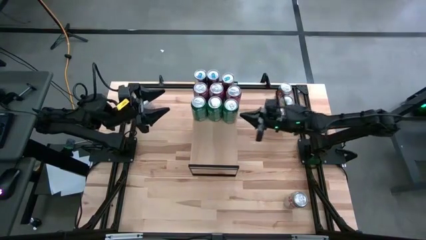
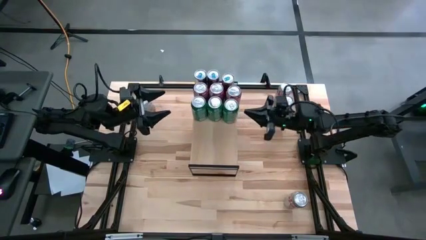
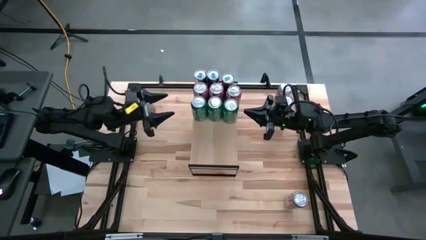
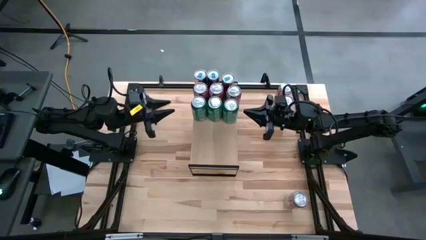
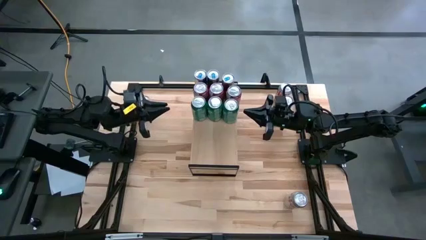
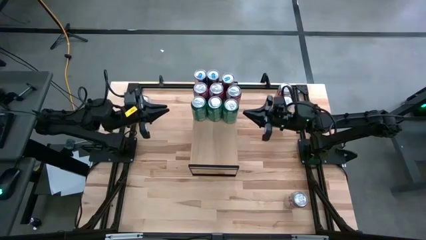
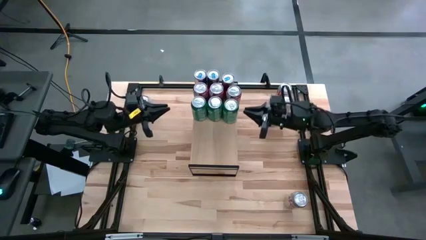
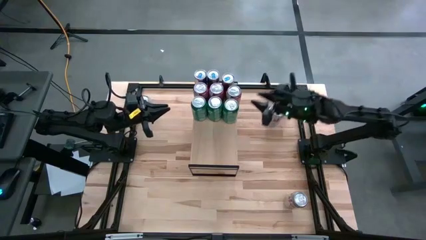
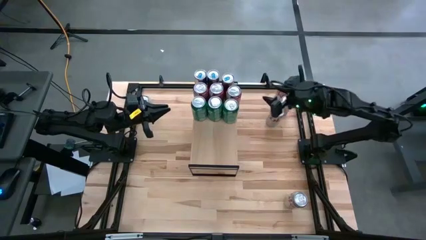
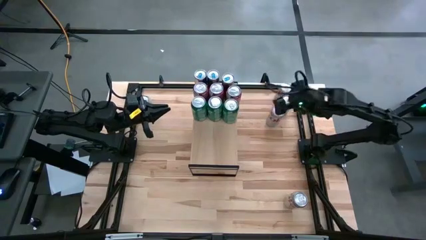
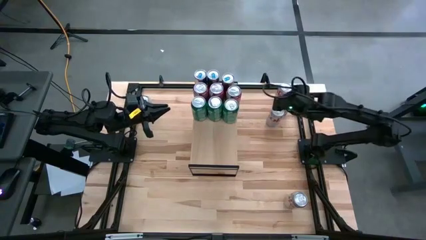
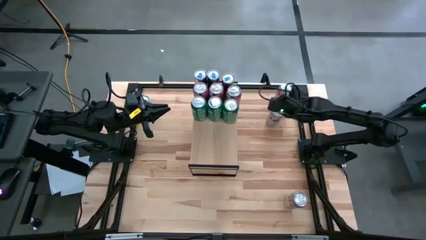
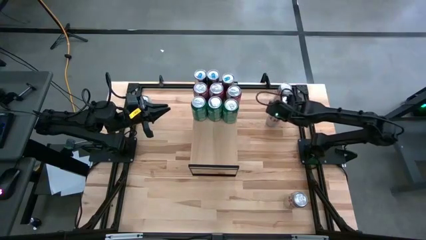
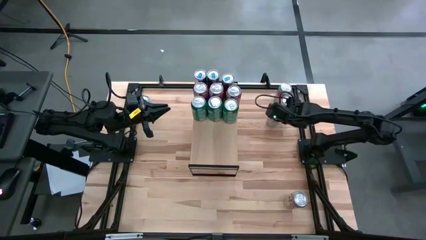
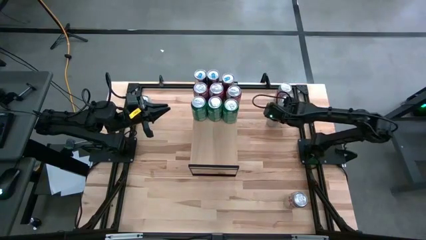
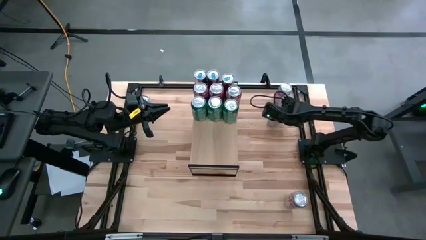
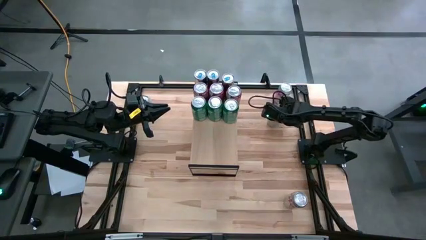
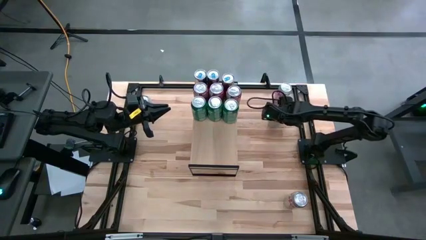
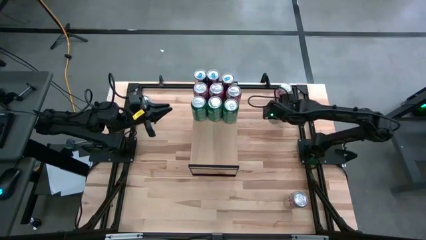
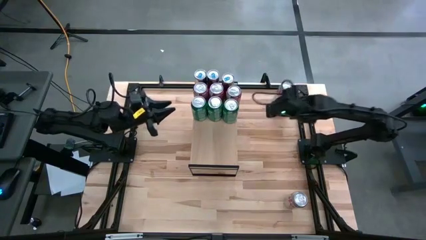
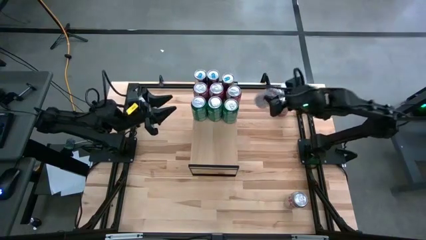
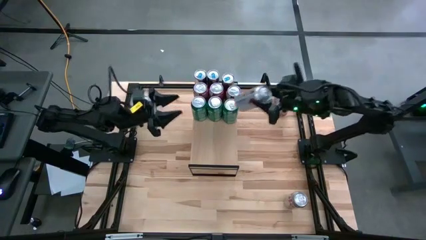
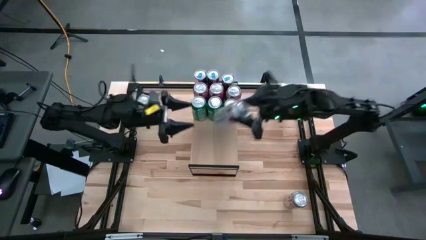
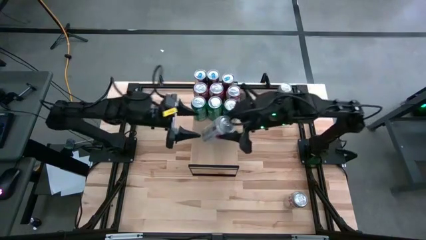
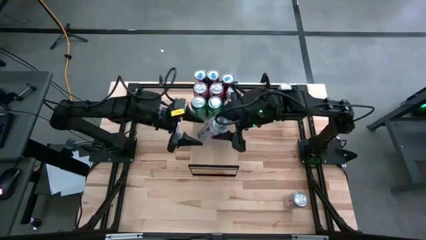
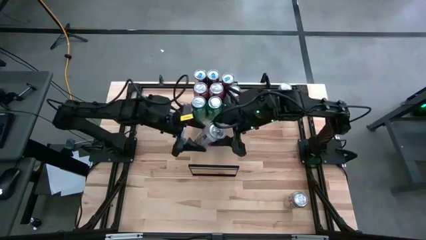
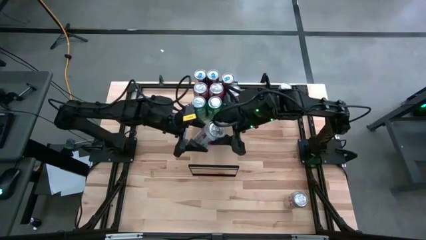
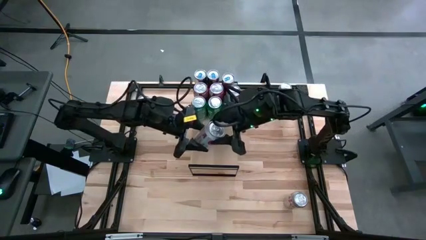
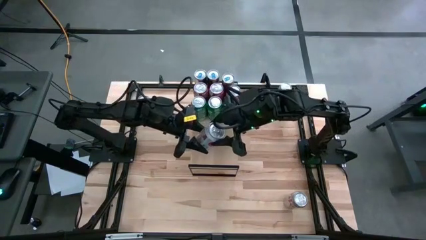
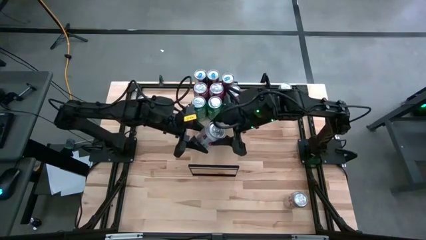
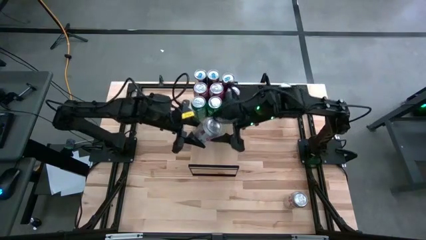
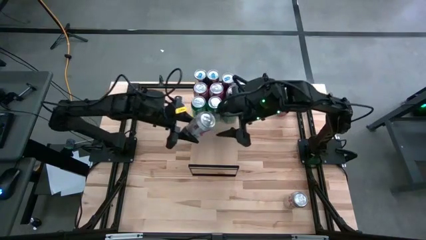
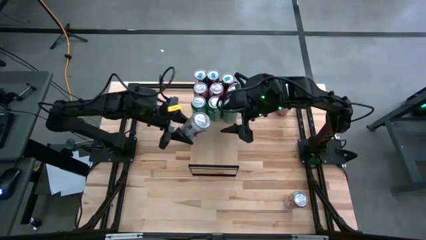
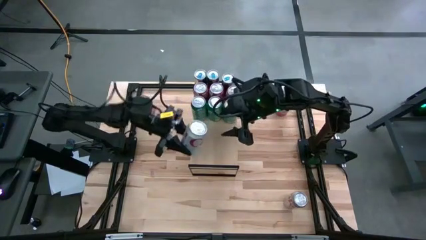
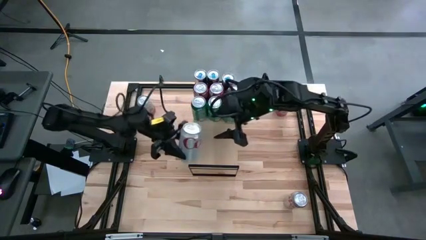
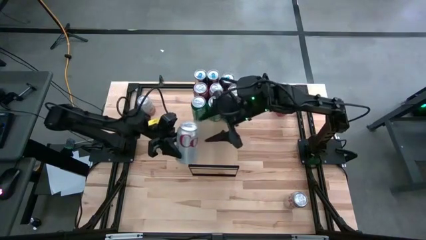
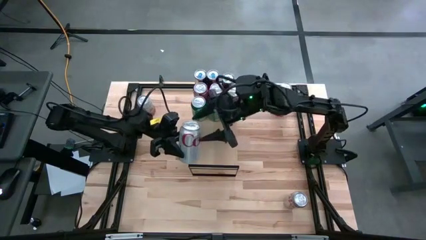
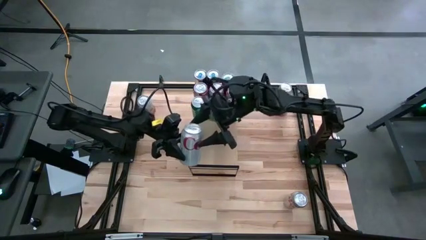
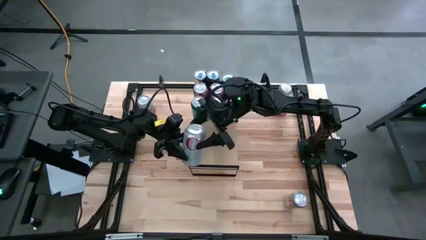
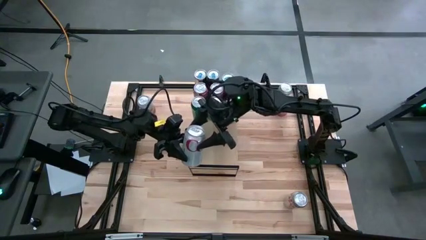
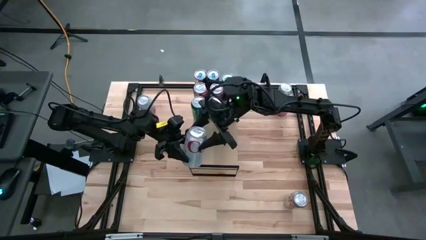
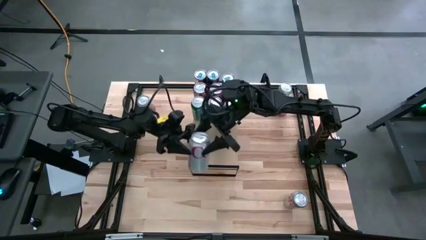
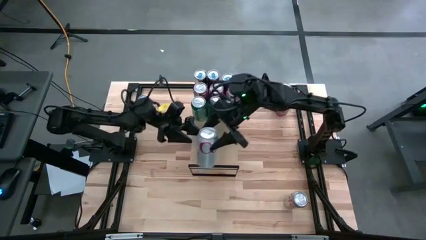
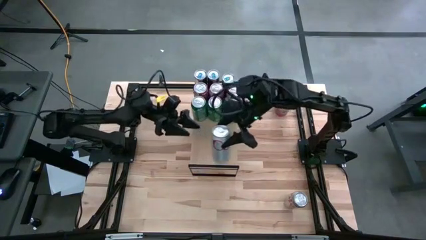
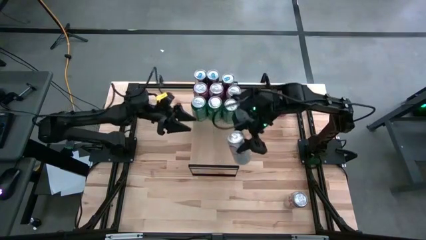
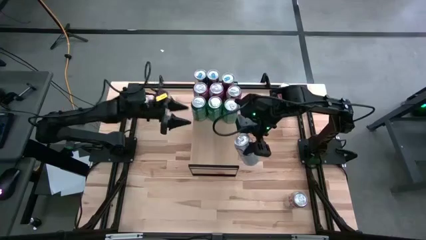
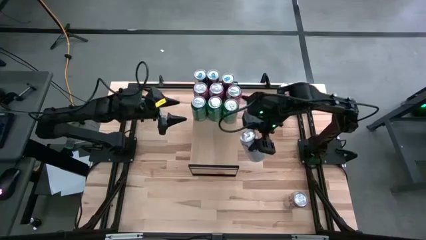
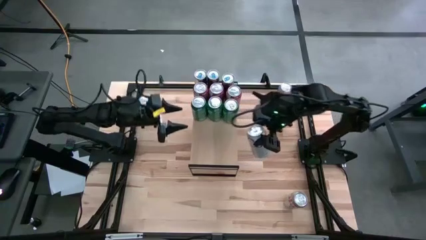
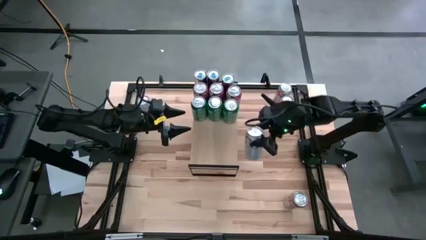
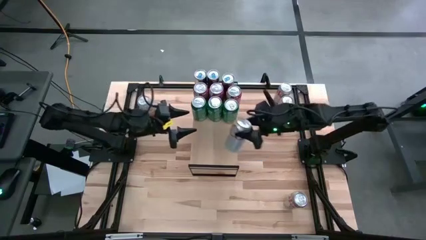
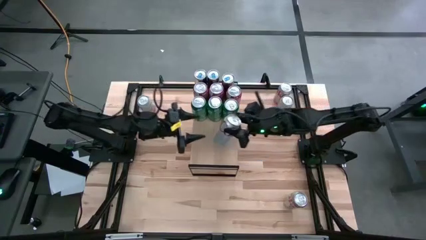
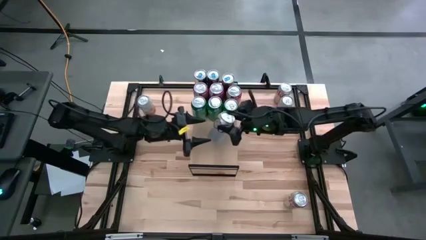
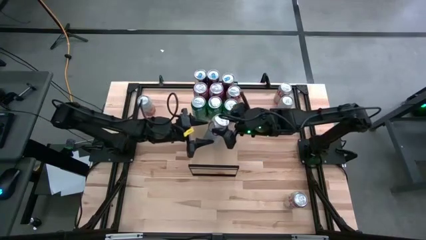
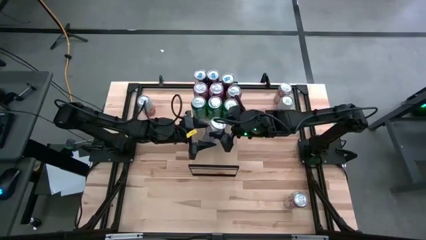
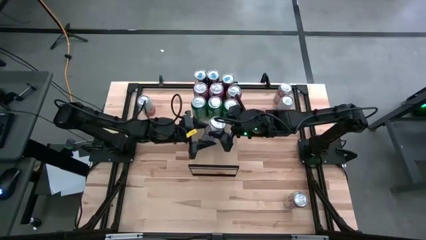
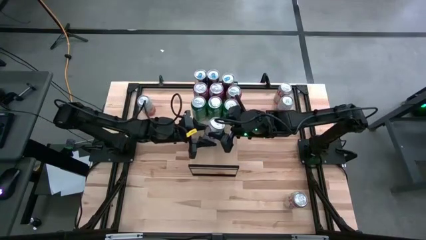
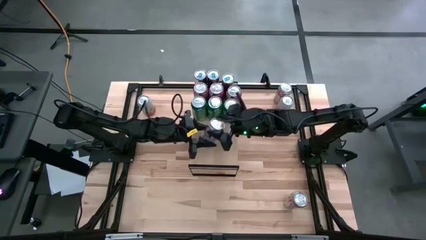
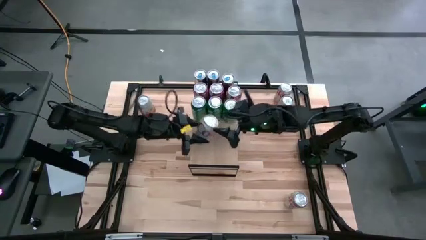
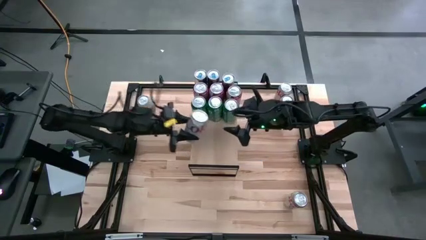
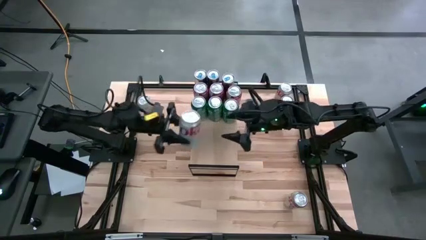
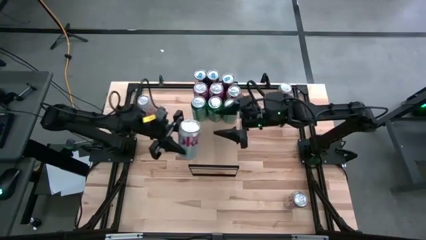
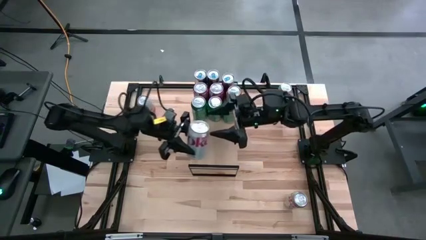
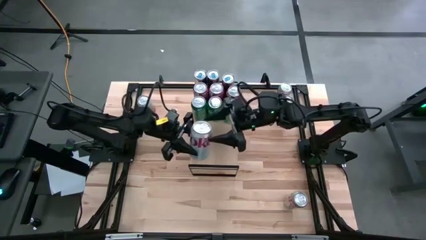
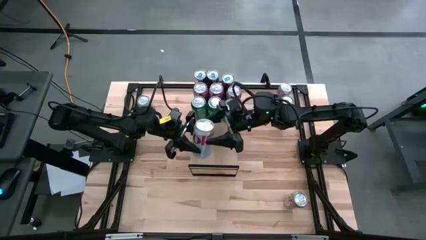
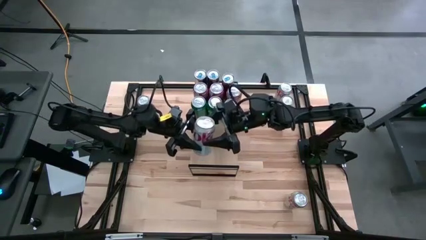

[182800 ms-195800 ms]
Task: Place canned beverage on shelf
Put the middle red silver soda can on the shelf

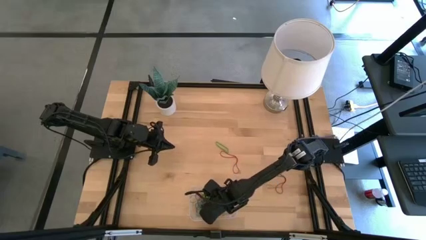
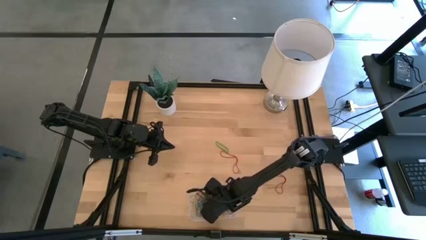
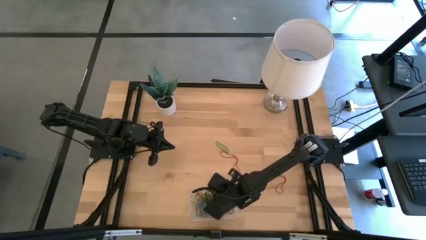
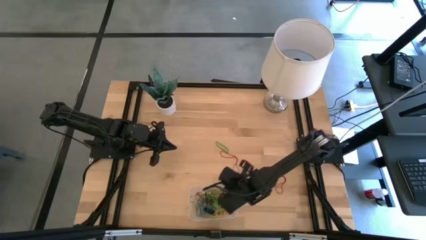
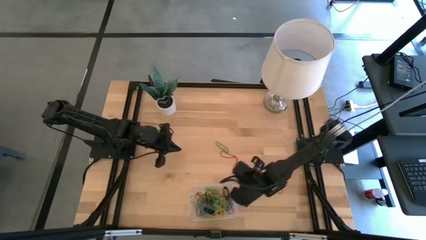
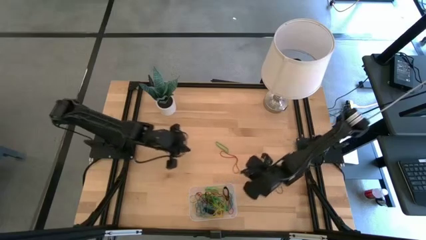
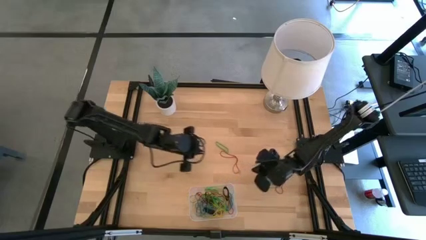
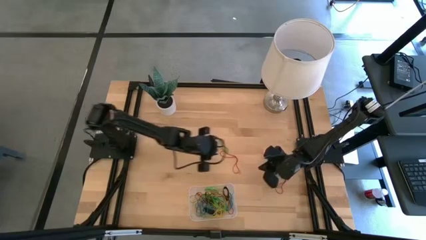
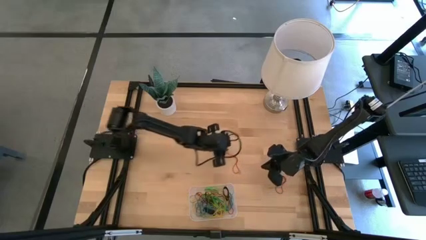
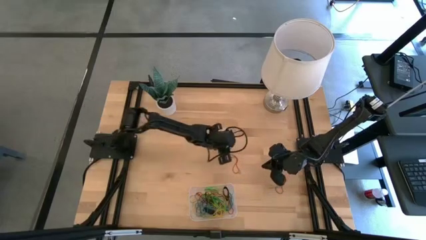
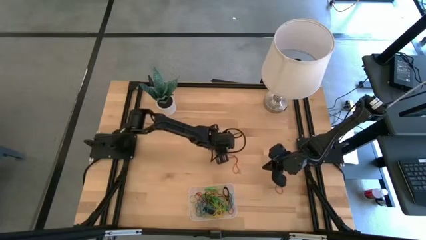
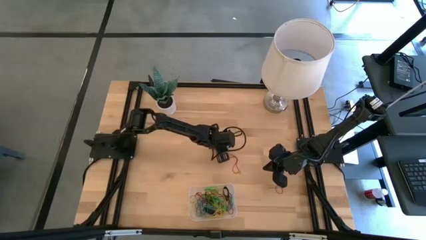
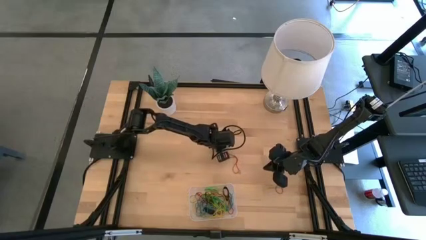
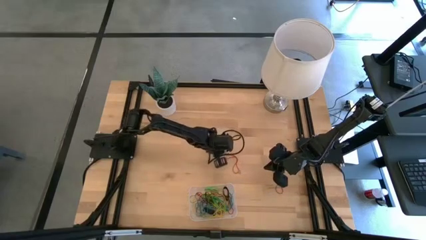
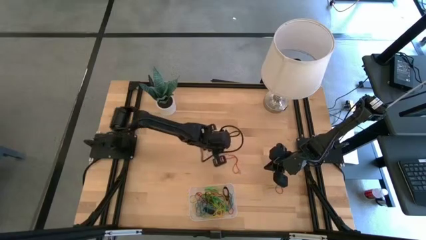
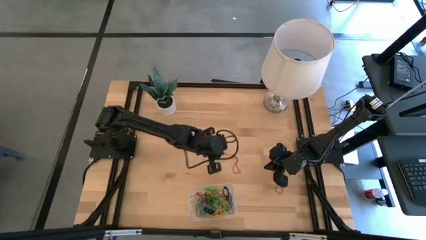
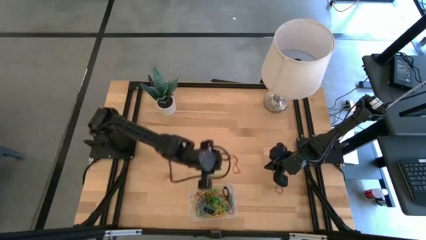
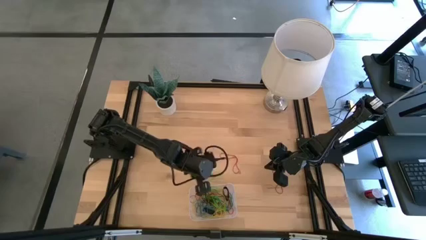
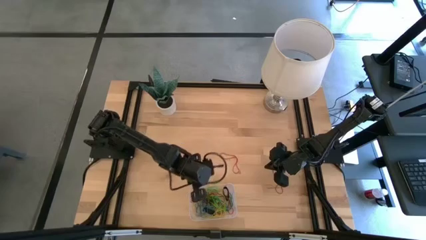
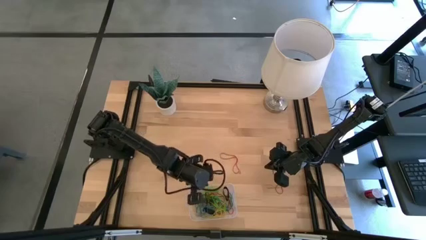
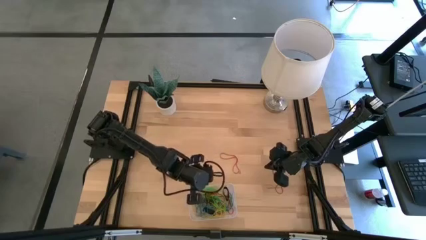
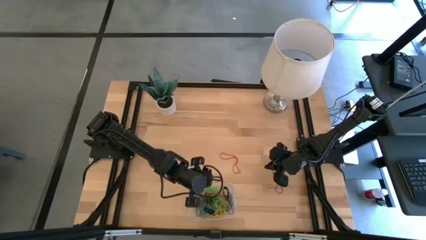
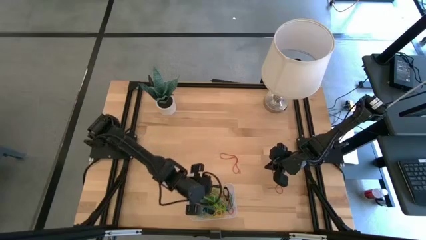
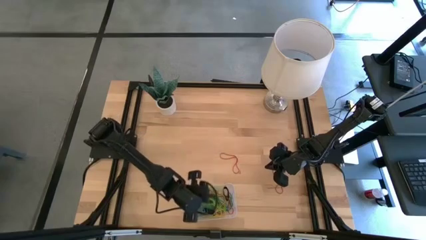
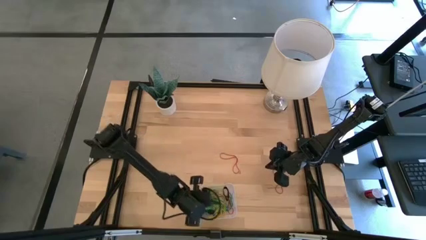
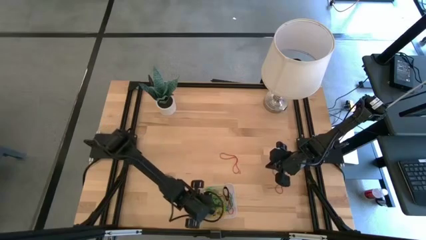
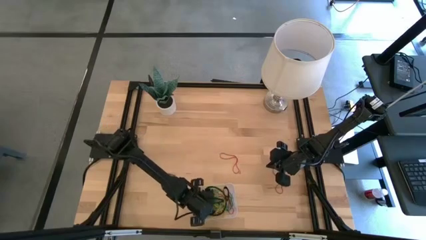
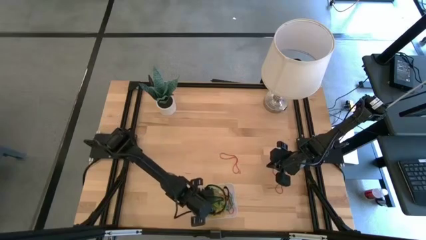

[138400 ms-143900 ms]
Task: Pick and place rubber bands into bin
Put the green rubber band into the transparent bin
